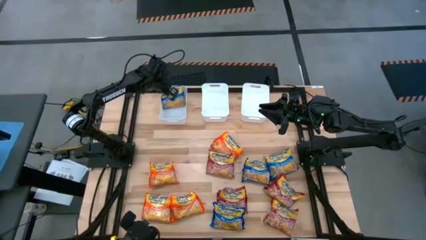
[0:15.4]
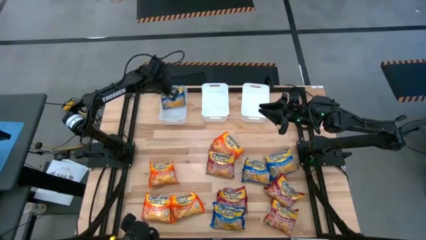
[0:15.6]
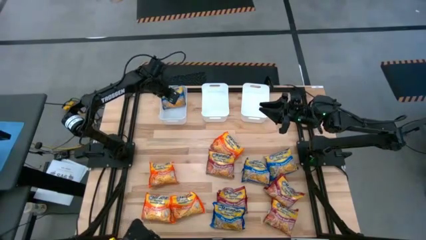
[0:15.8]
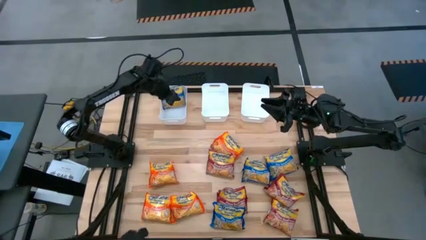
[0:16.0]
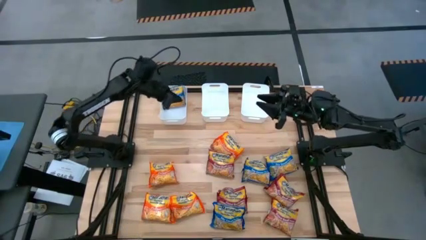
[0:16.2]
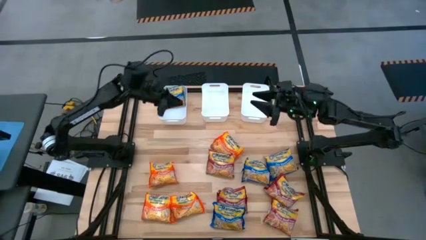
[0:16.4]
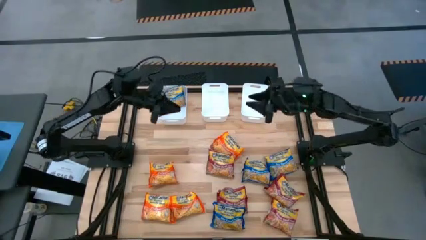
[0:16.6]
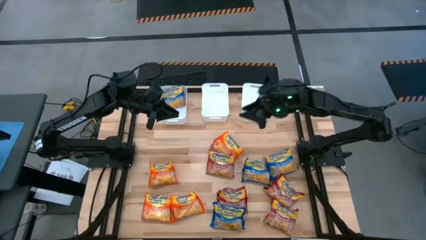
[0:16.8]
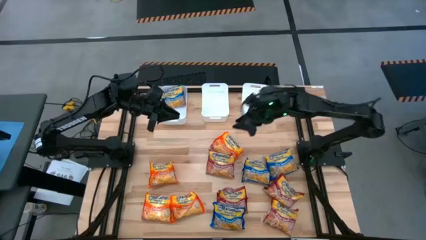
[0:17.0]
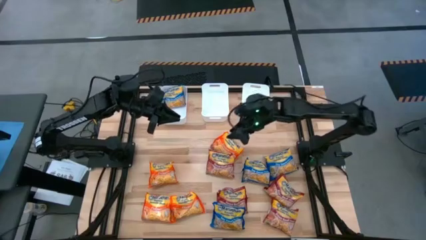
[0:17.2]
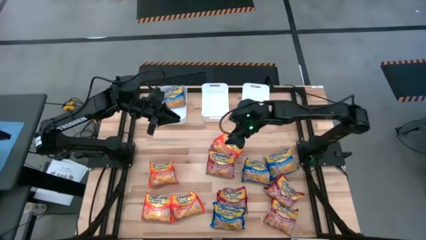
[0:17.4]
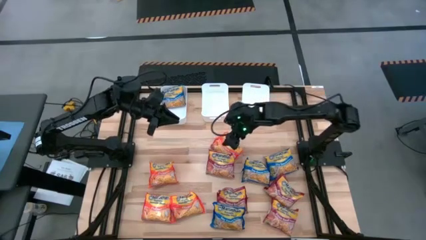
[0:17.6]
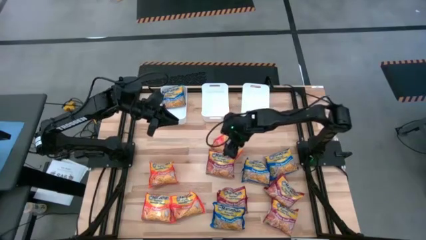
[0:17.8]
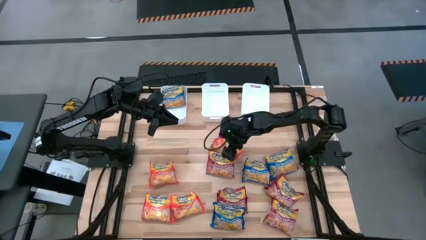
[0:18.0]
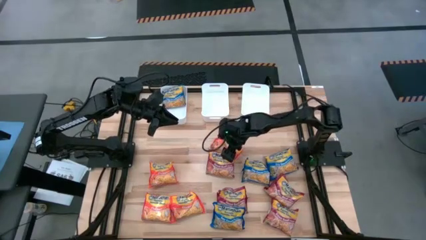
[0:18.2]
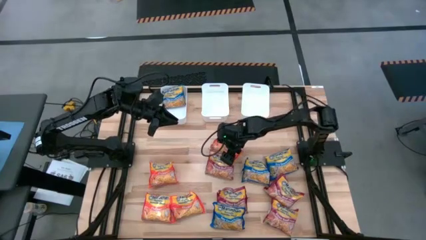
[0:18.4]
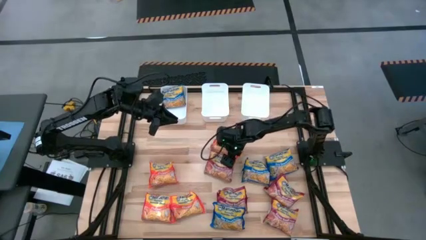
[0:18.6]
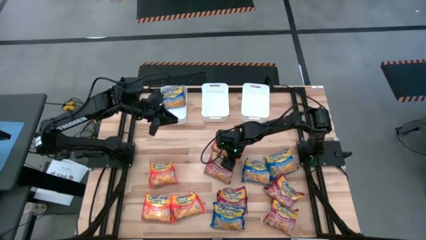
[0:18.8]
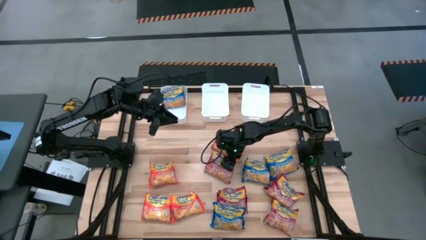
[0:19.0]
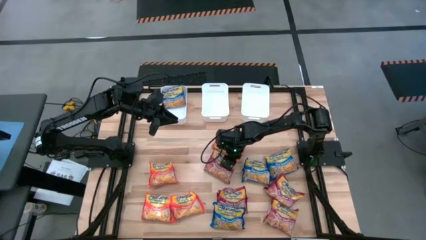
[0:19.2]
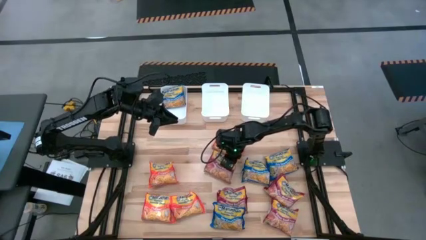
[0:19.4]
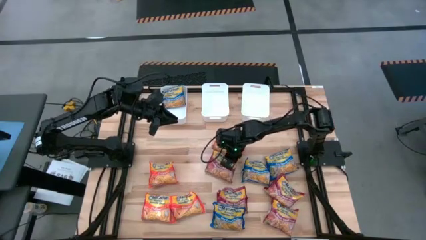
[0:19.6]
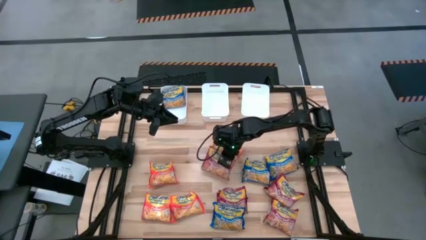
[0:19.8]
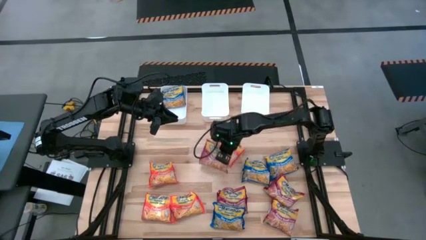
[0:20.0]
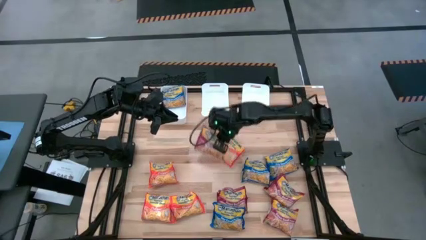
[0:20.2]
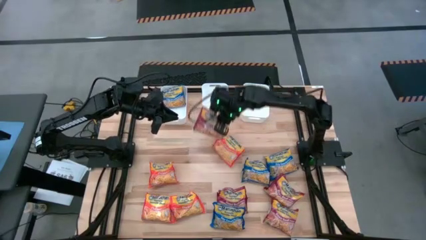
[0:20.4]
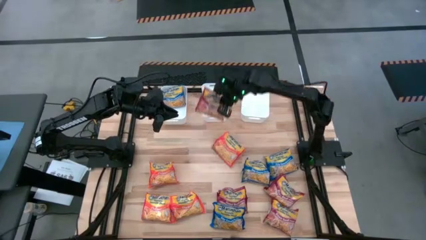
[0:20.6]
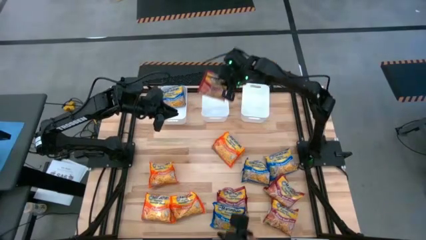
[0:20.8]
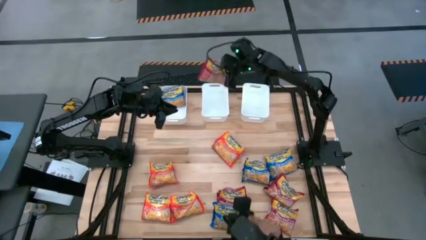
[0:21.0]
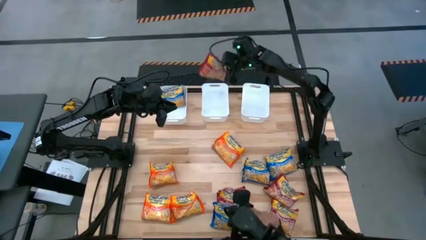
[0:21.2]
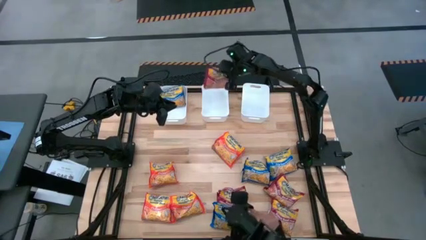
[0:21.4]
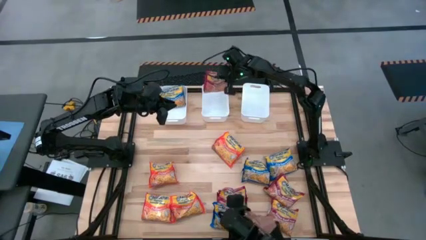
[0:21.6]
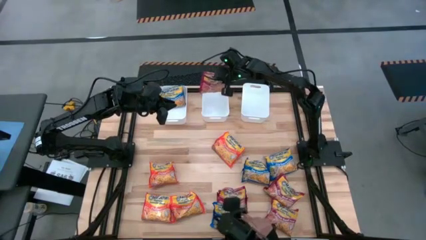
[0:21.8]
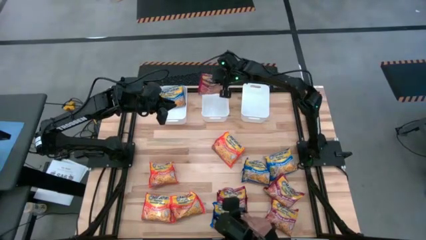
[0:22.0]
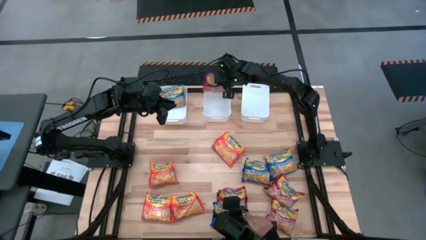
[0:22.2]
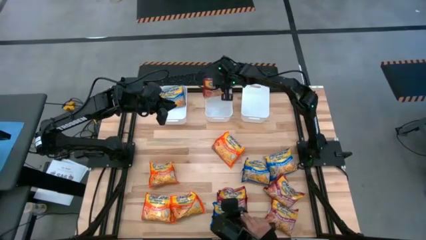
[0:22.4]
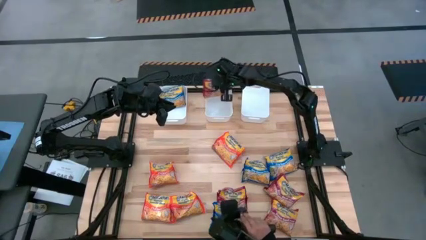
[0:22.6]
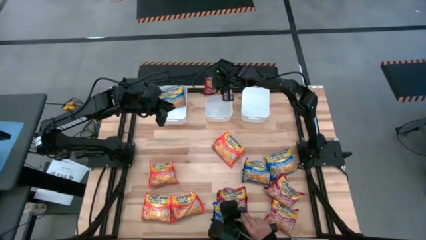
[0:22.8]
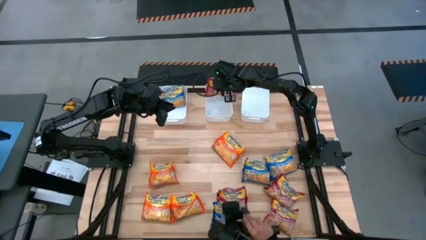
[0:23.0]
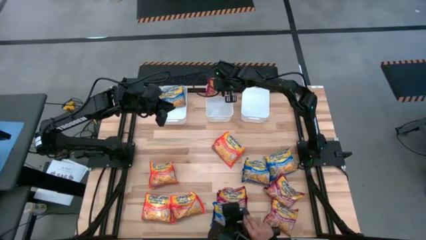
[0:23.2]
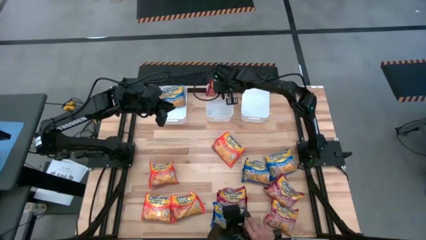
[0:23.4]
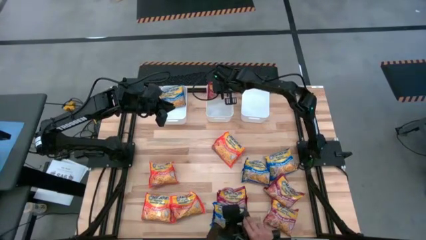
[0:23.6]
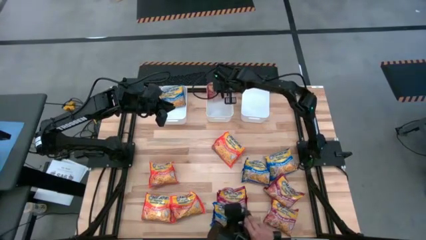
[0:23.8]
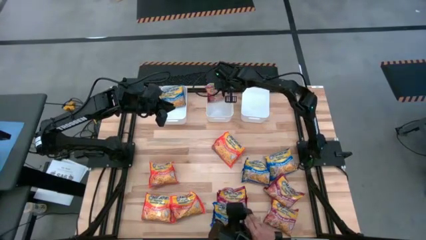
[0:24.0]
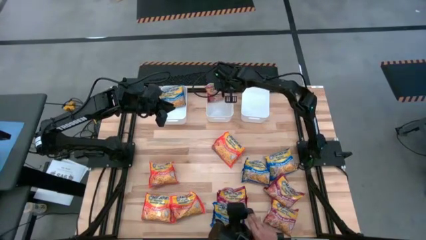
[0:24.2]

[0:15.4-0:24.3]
Task: Sort Maruchan noodles
Put the red noodle pack into the middle white bin
